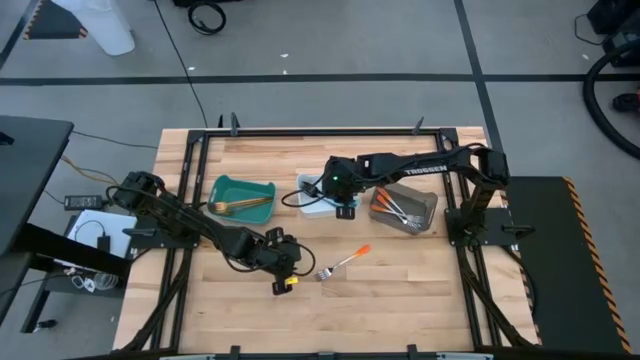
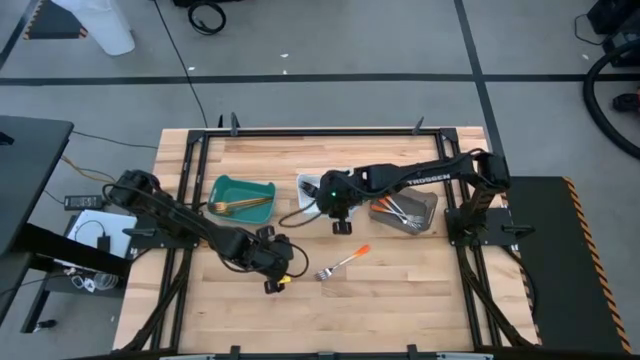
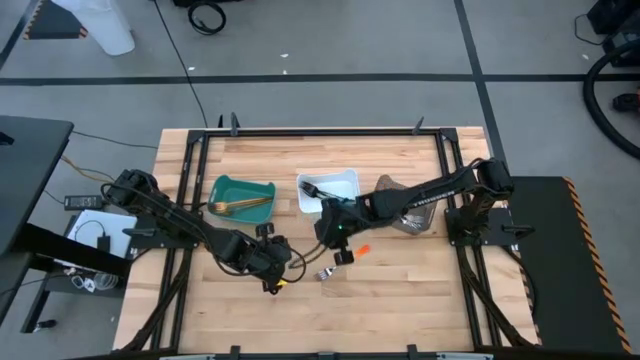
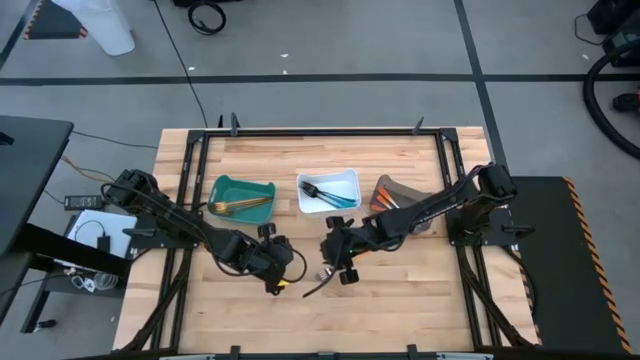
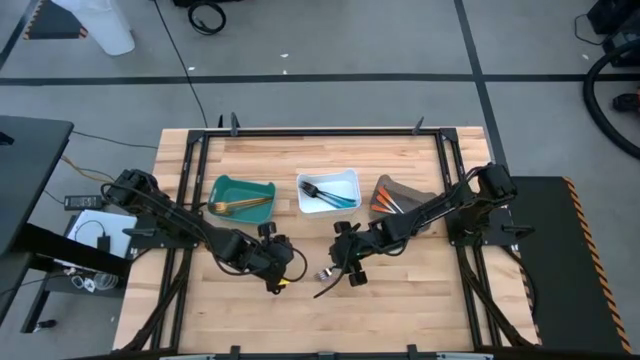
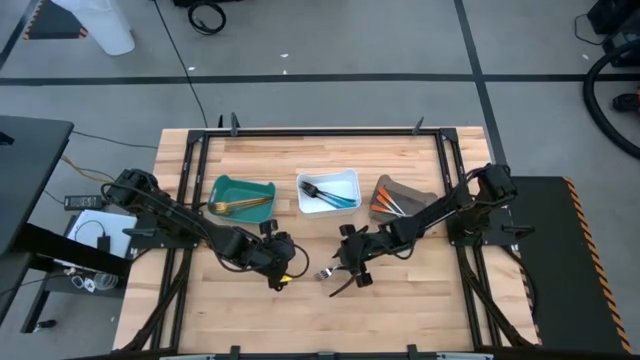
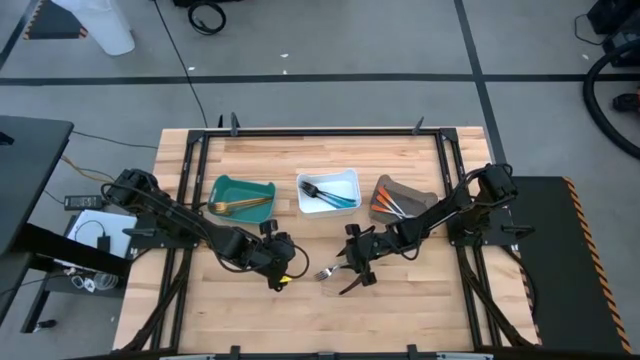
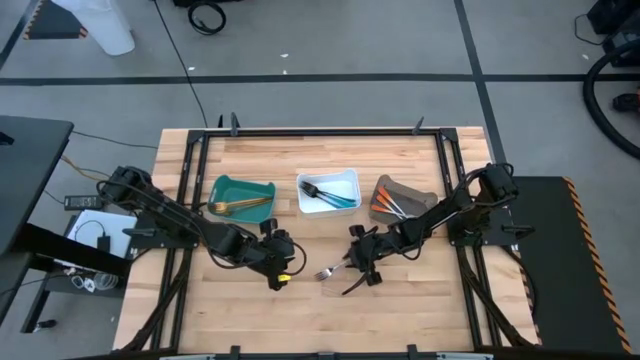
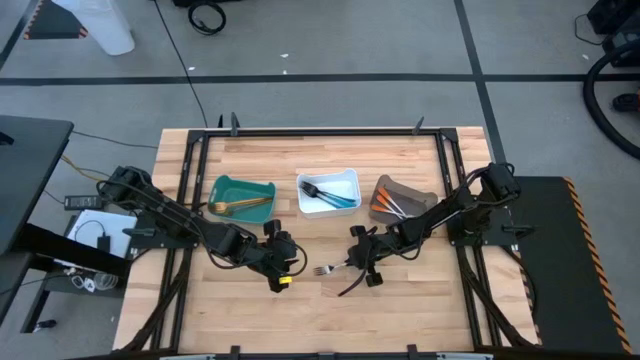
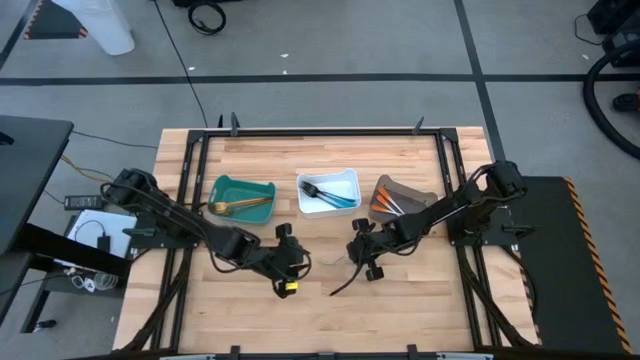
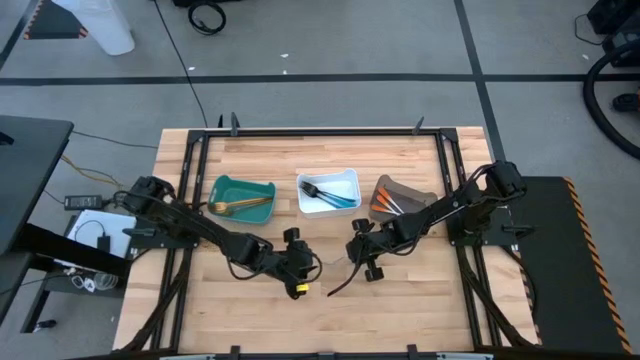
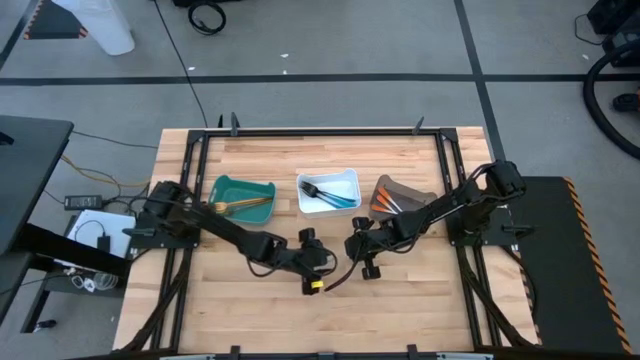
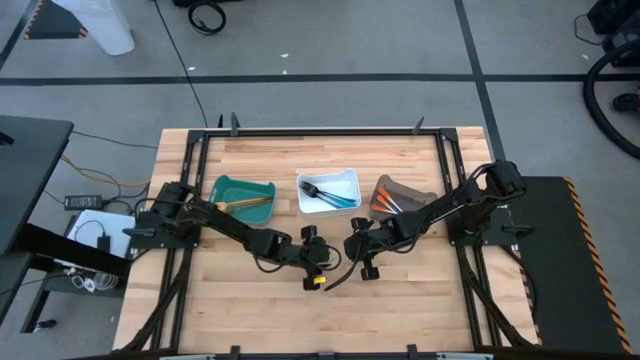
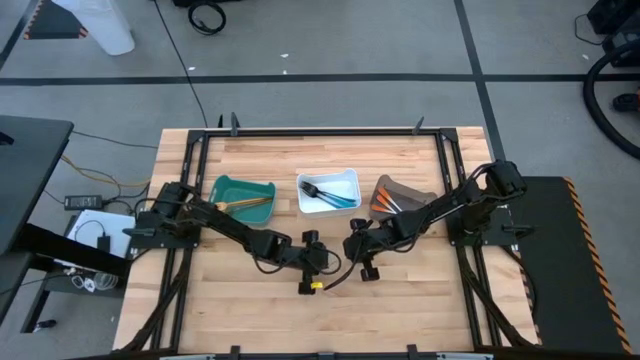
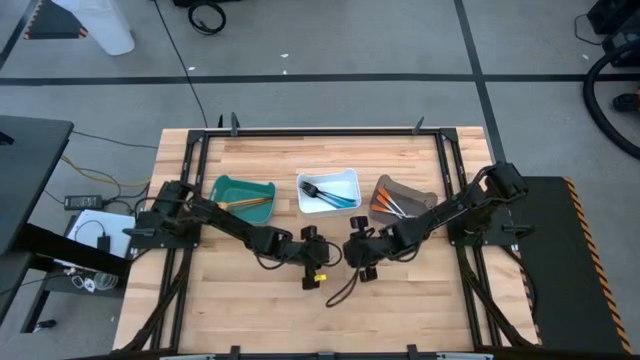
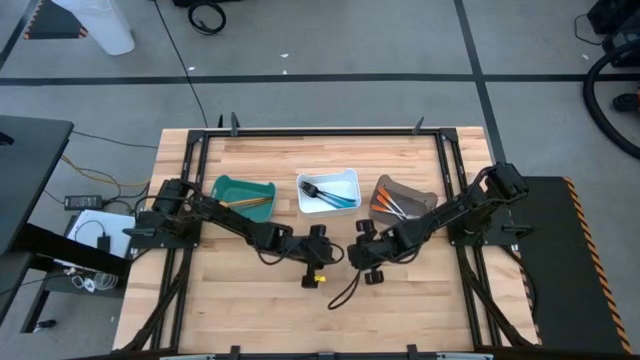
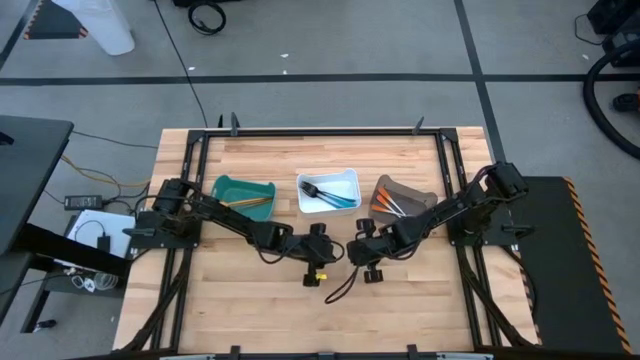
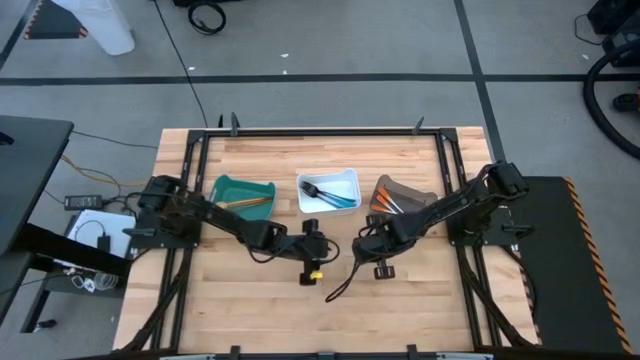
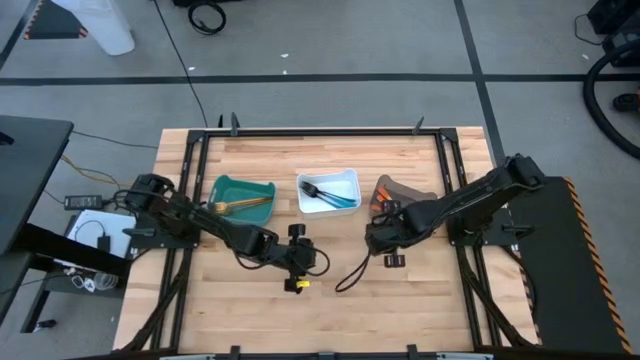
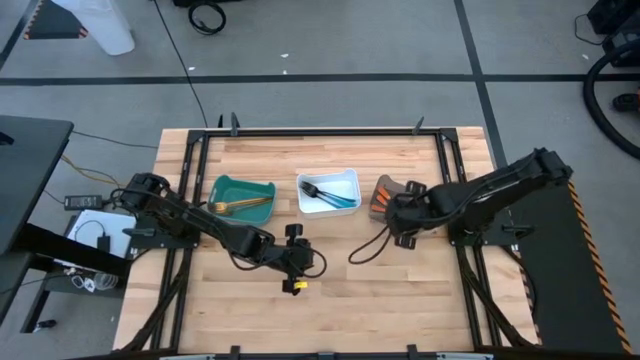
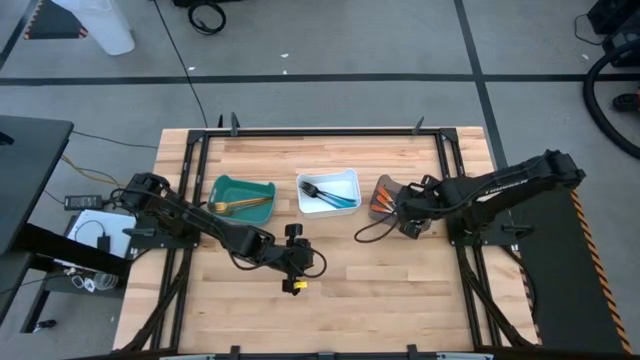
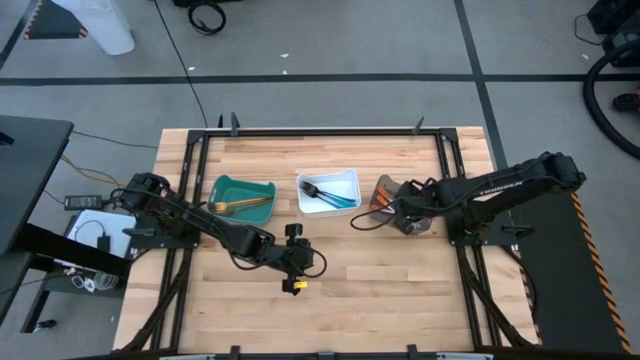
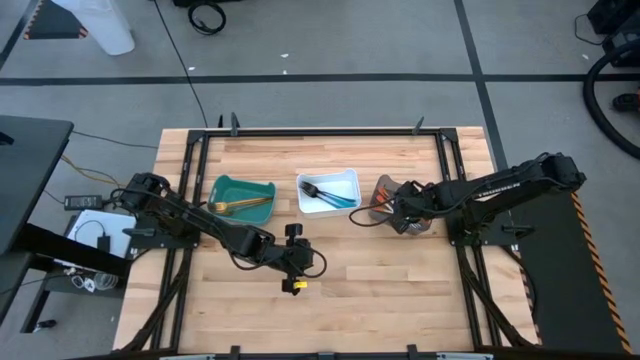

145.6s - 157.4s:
Task: Sort silverware by color (type)
Put the orange fork into the black bin

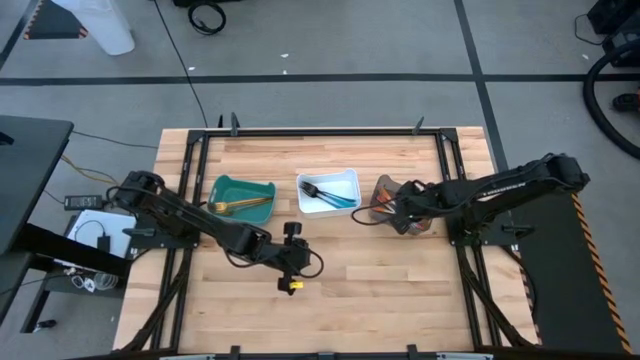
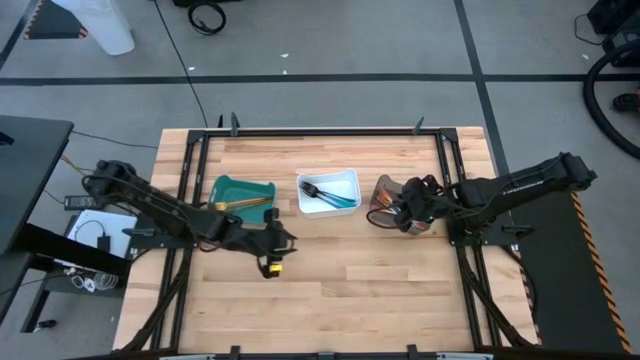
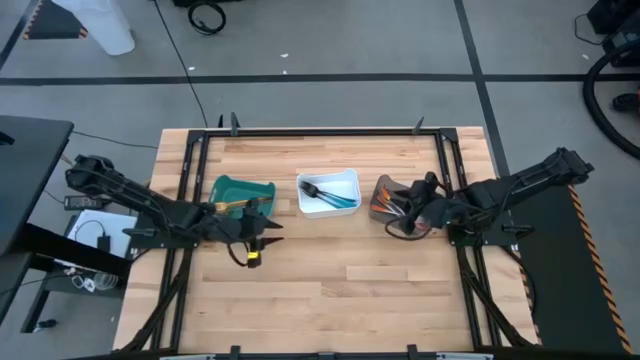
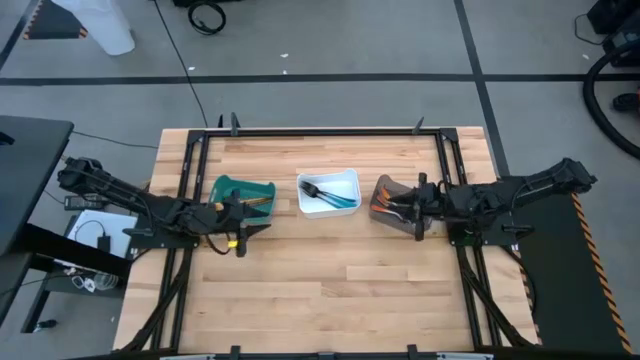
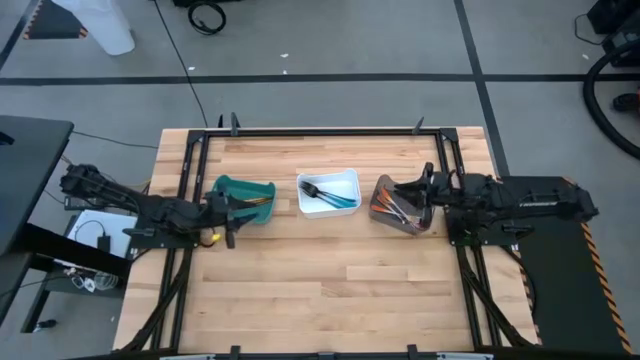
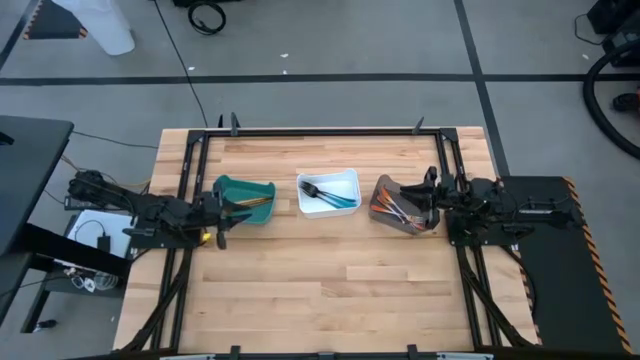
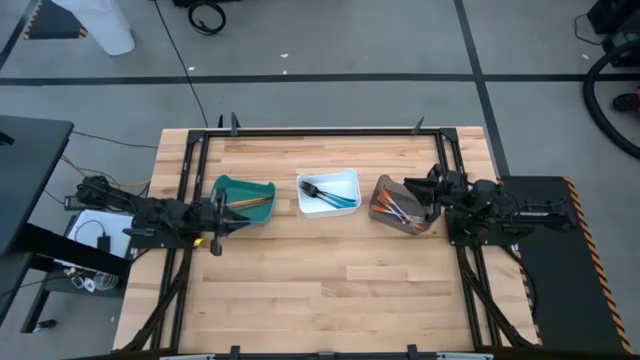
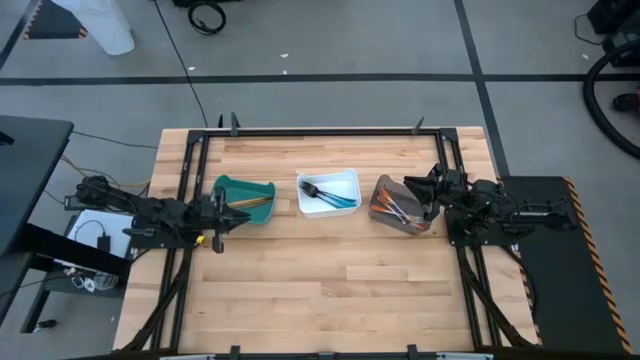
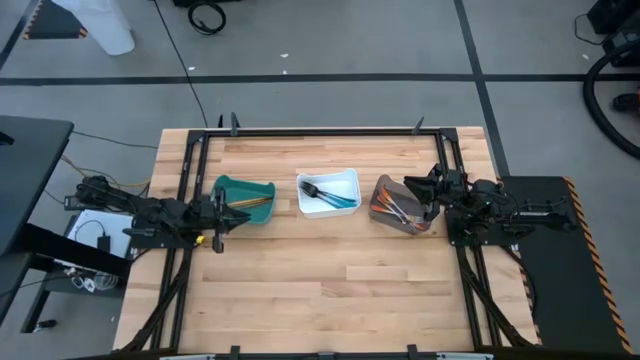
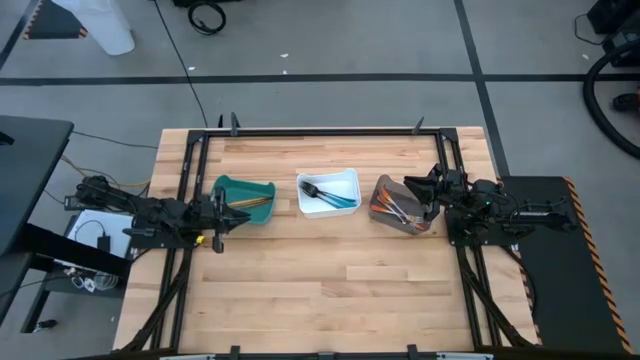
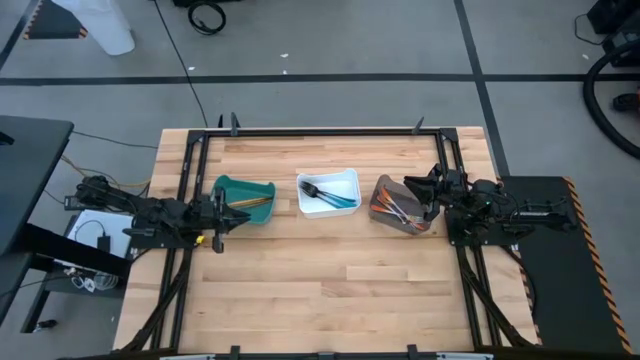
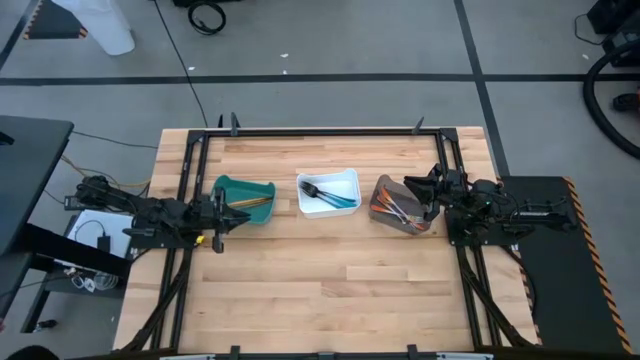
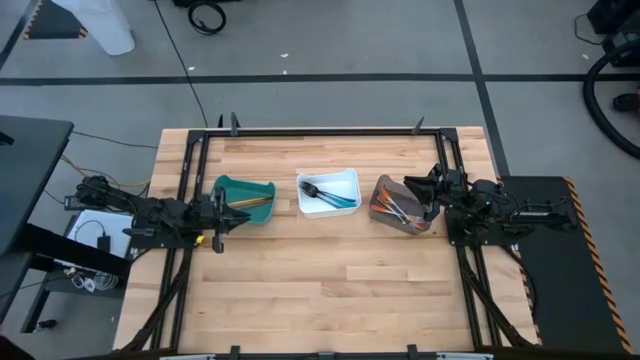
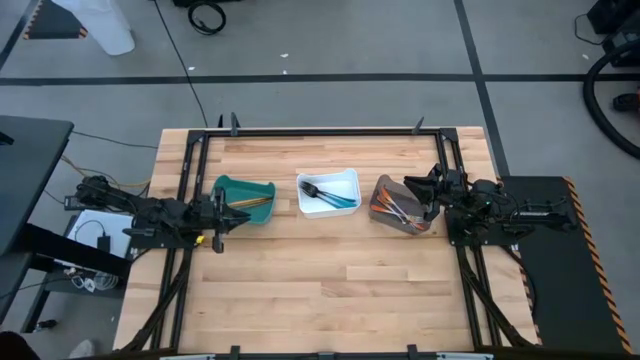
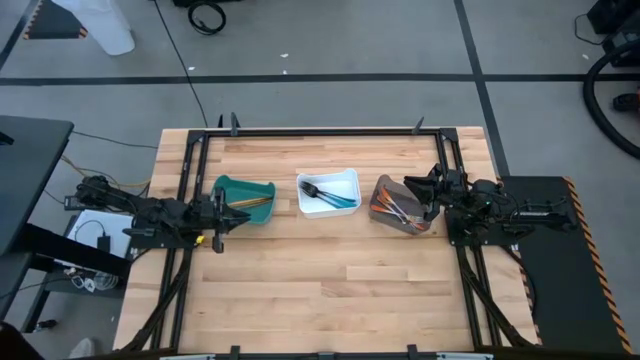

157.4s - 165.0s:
Return to Home Position

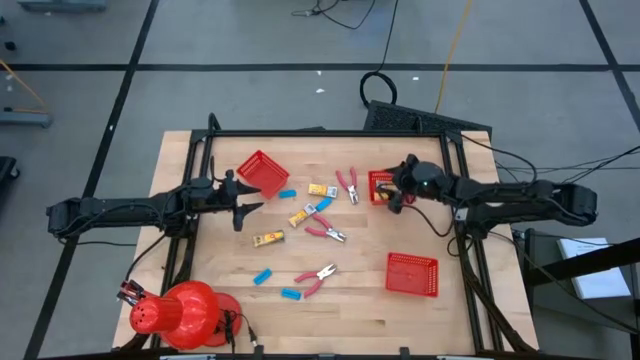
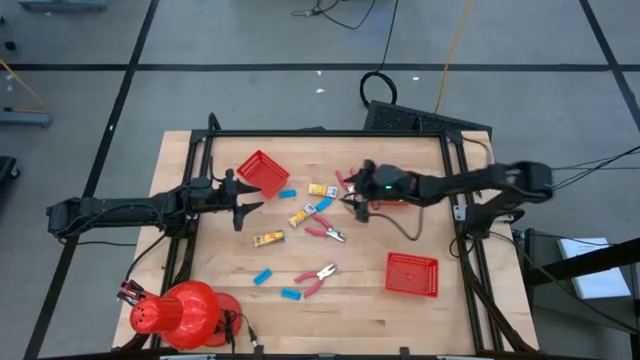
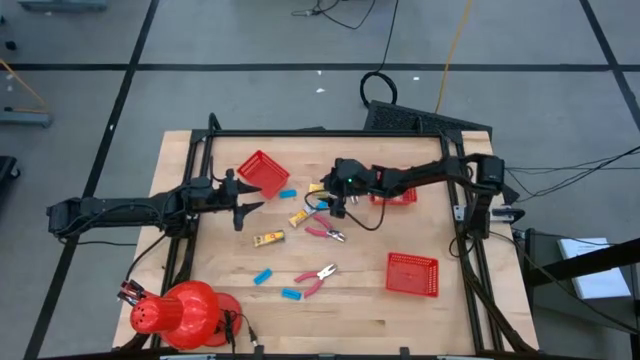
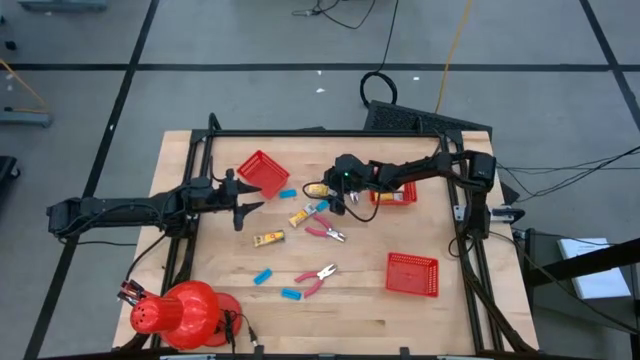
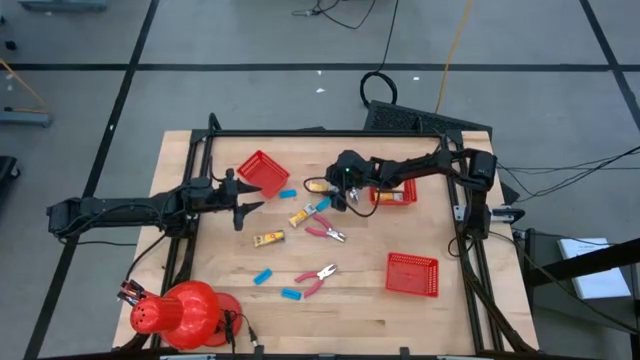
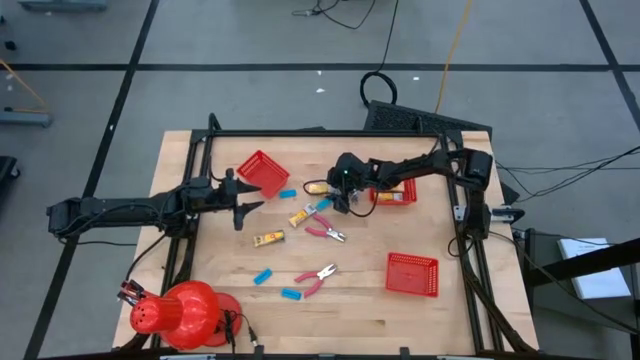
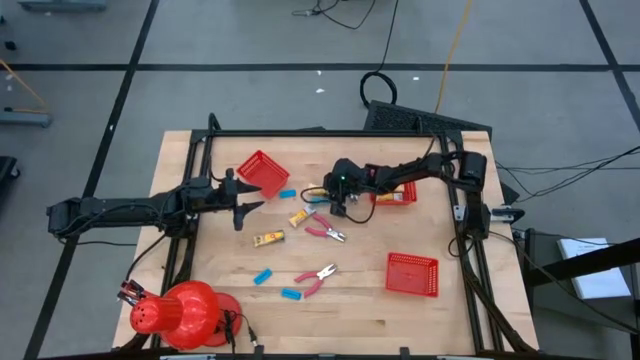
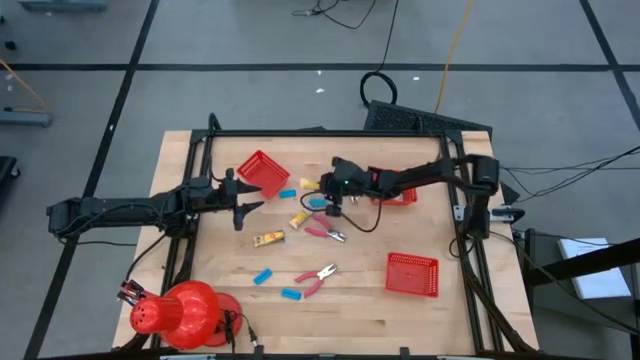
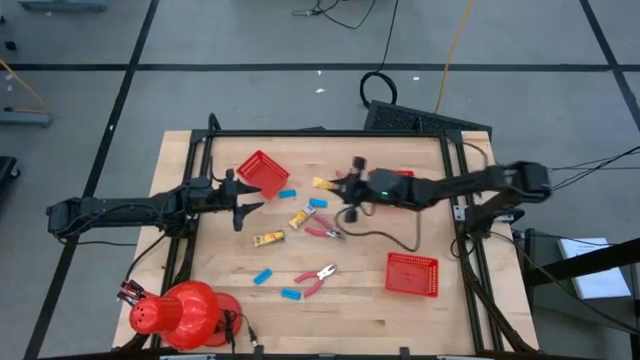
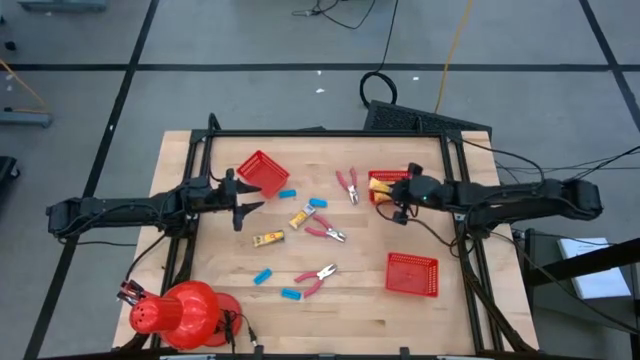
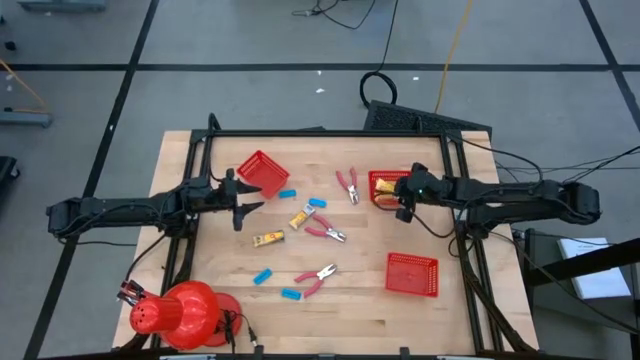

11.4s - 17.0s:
Task: Pick & Place School Supplies
Put the yellow crayon box into the top right red bin
